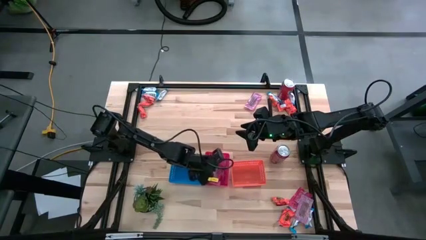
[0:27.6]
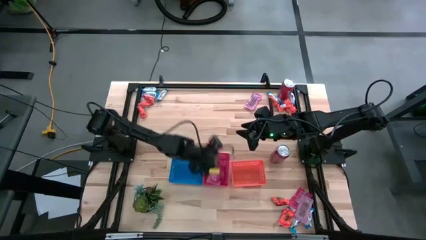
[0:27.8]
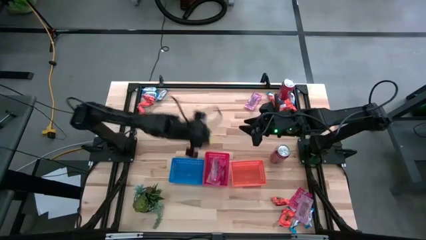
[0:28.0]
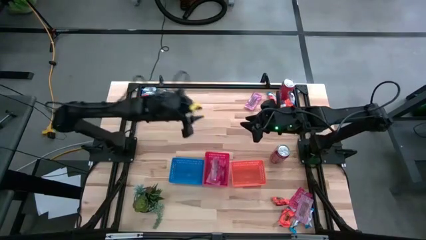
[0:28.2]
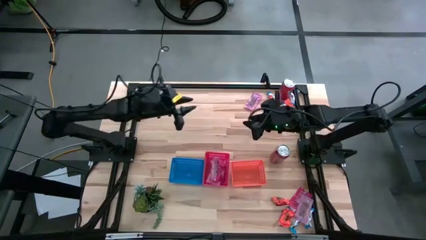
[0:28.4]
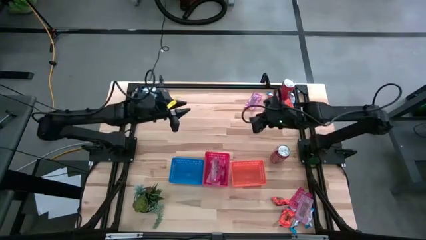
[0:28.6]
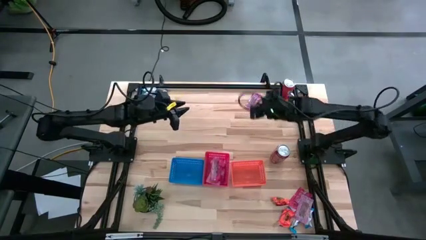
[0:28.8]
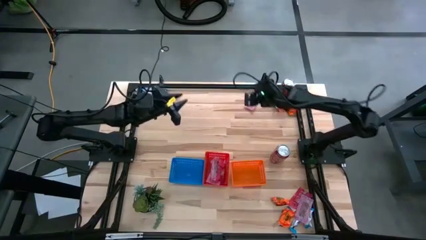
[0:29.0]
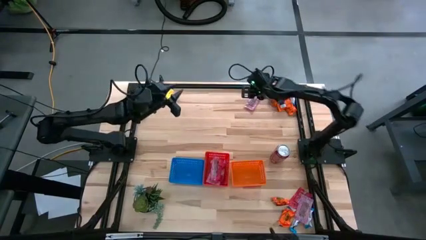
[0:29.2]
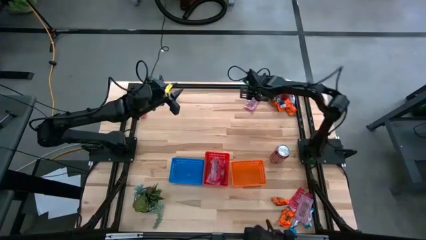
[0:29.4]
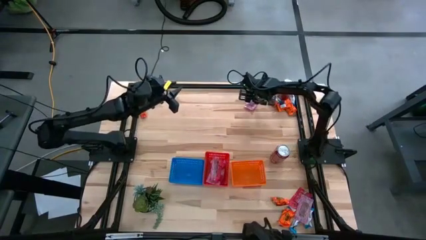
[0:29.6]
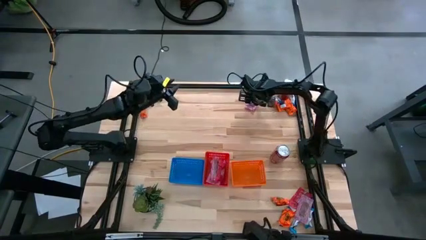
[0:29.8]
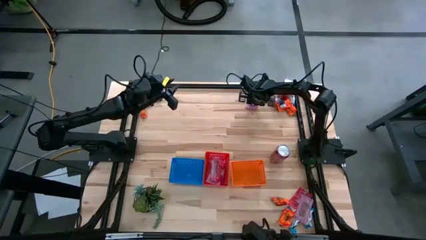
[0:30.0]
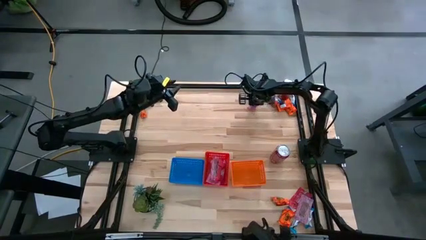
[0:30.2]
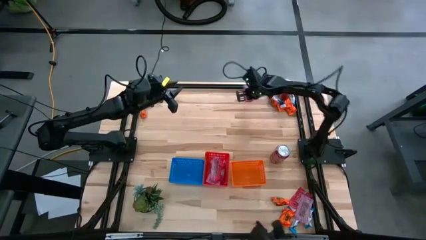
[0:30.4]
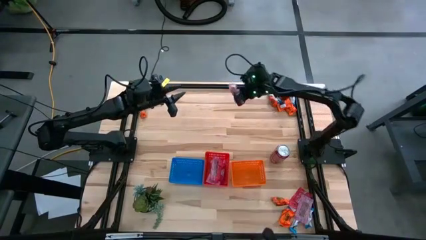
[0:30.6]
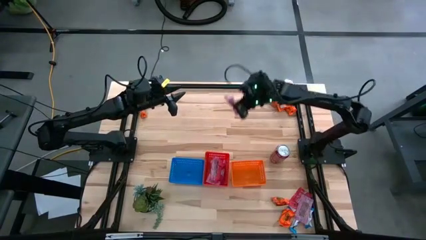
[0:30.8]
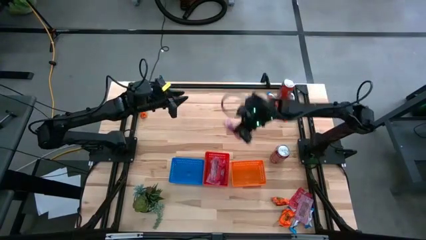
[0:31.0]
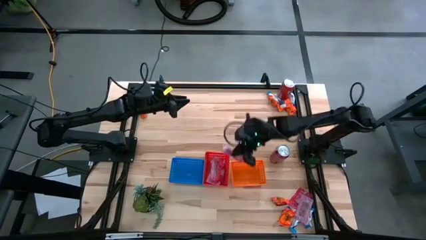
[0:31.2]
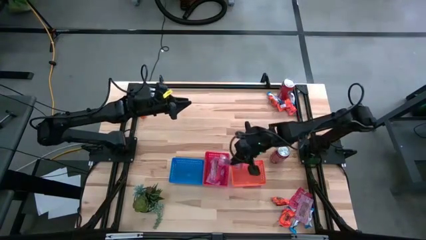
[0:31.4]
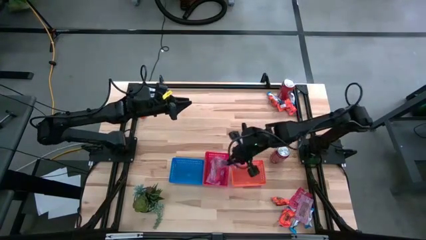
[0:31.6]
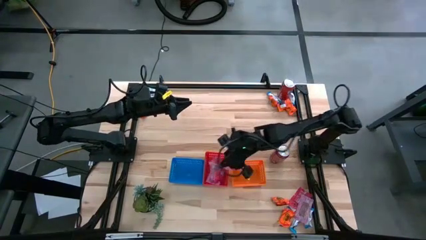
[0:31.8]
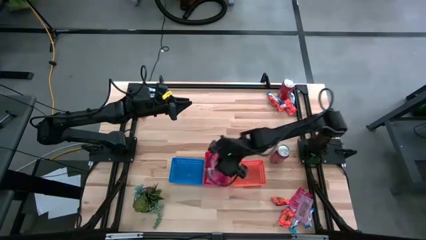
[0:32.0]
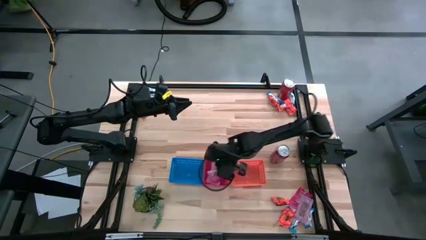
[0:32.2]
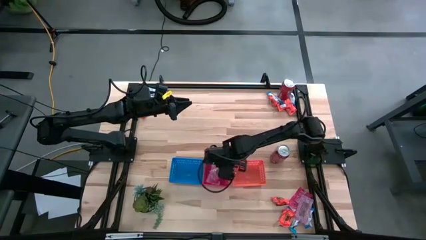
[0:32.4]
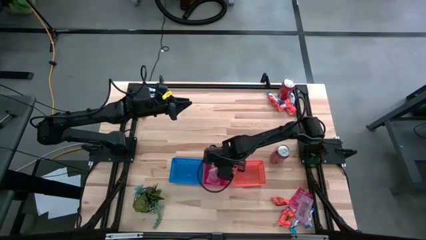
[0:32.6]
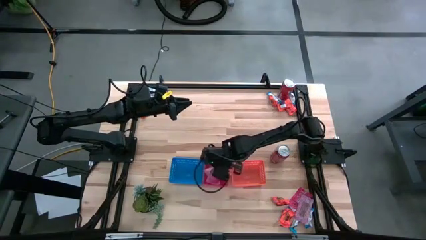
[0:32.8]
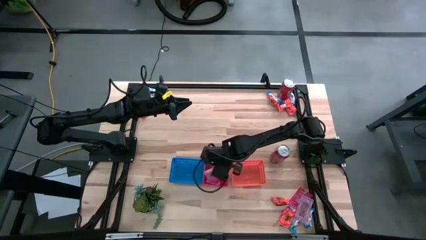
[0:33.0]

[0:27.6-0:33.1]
Task: Sort candy
Put the red candy pack into the red bin

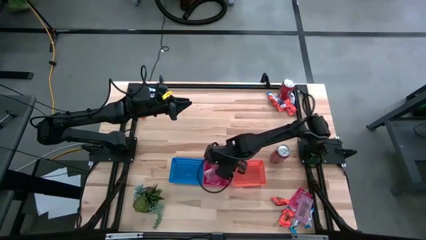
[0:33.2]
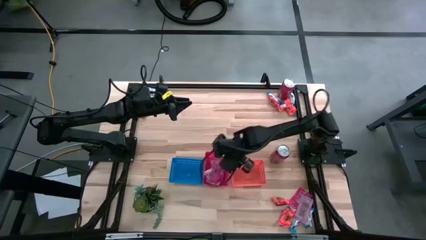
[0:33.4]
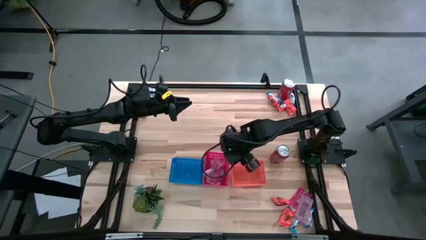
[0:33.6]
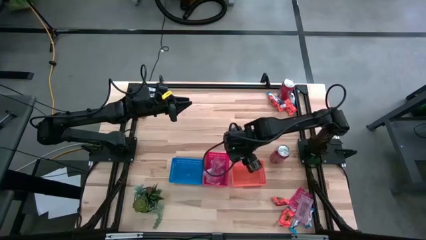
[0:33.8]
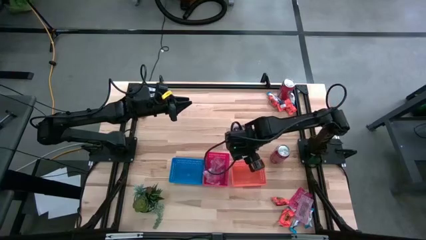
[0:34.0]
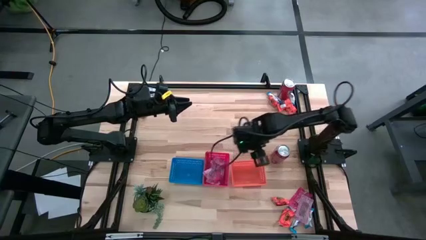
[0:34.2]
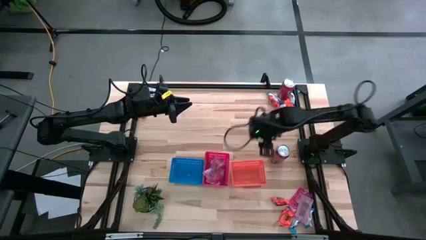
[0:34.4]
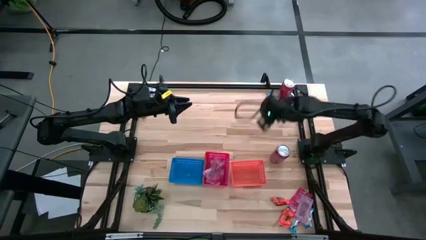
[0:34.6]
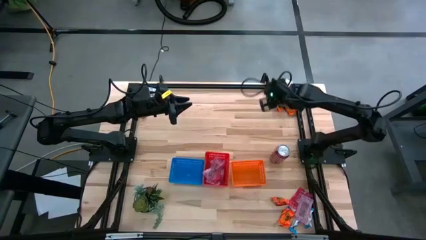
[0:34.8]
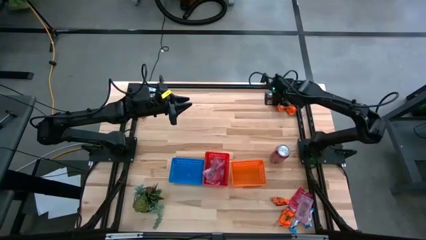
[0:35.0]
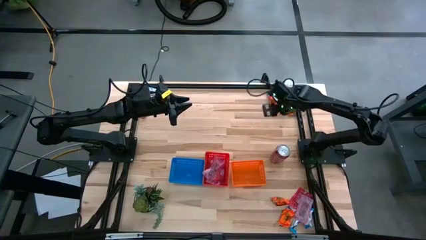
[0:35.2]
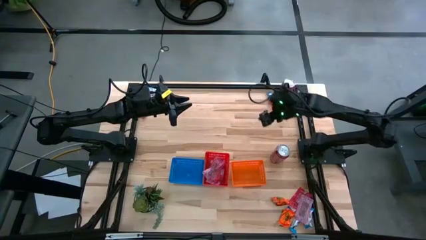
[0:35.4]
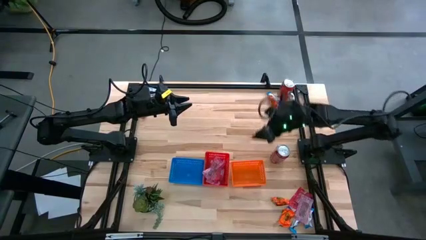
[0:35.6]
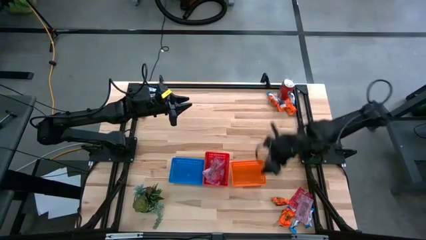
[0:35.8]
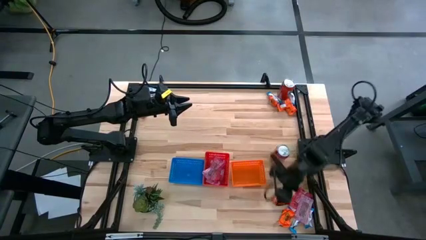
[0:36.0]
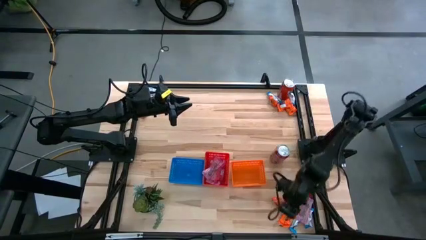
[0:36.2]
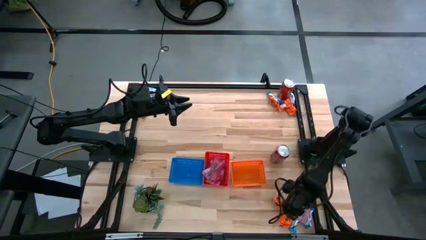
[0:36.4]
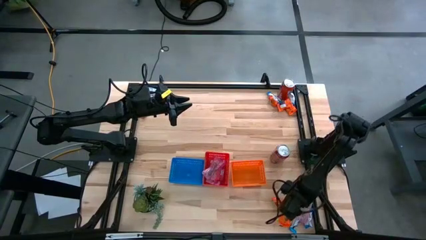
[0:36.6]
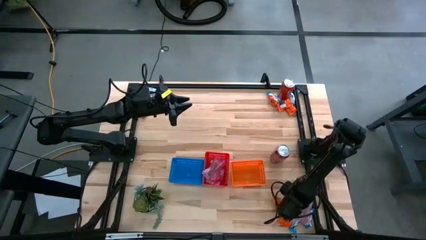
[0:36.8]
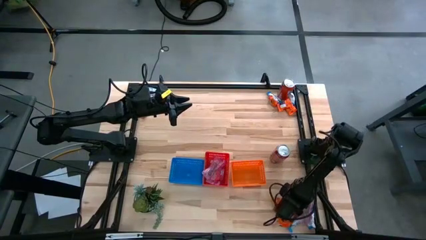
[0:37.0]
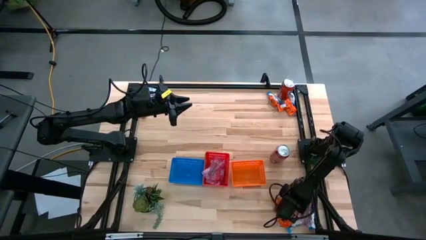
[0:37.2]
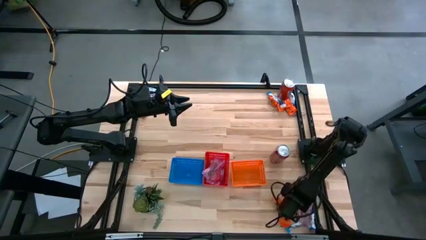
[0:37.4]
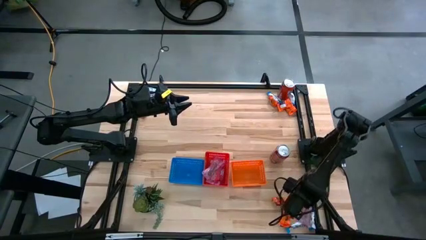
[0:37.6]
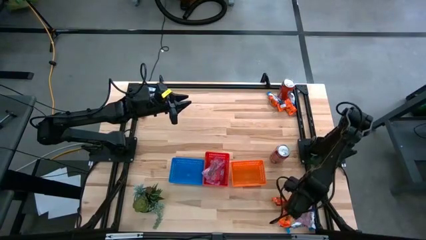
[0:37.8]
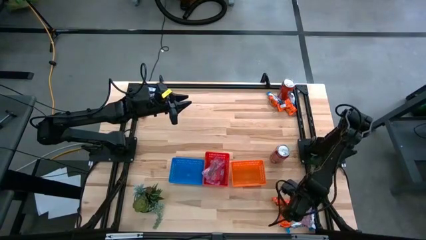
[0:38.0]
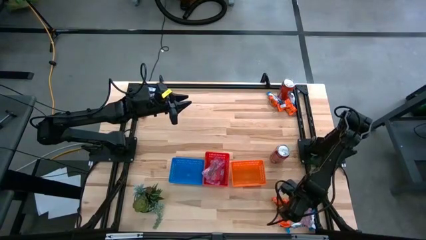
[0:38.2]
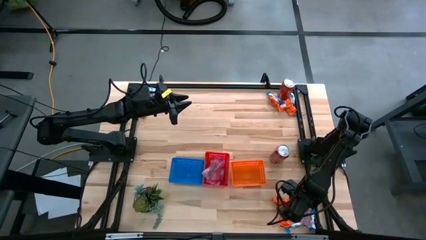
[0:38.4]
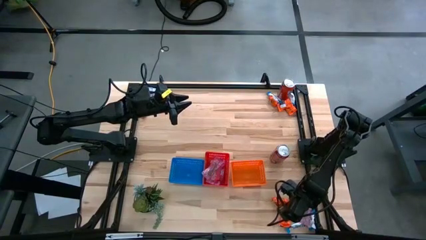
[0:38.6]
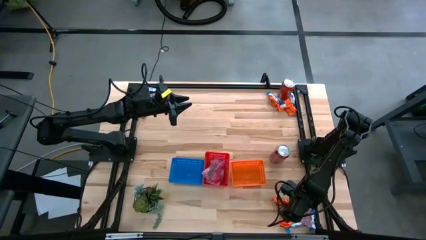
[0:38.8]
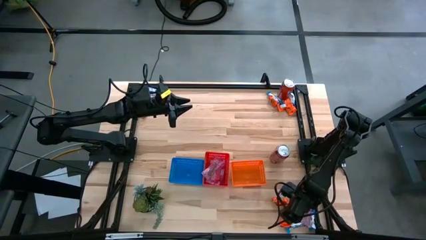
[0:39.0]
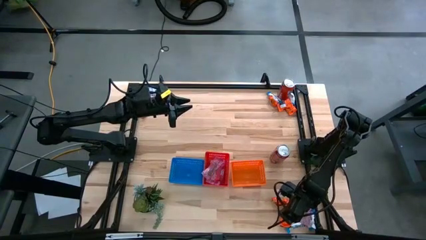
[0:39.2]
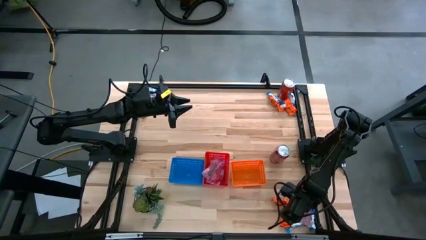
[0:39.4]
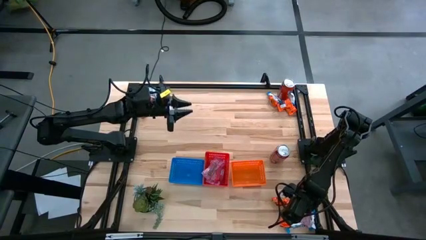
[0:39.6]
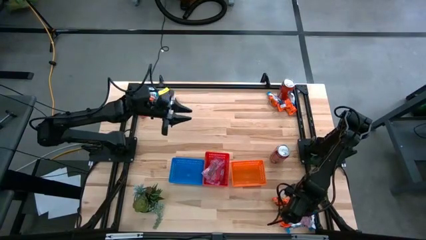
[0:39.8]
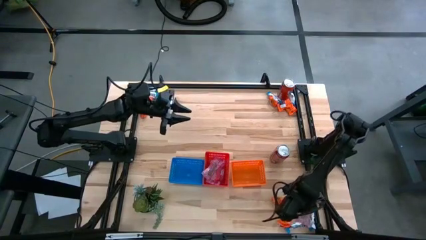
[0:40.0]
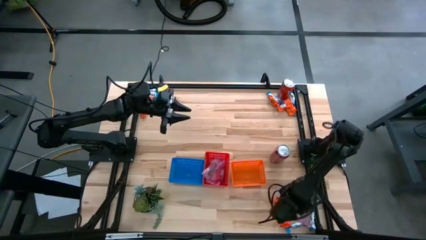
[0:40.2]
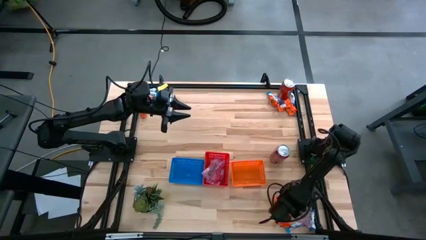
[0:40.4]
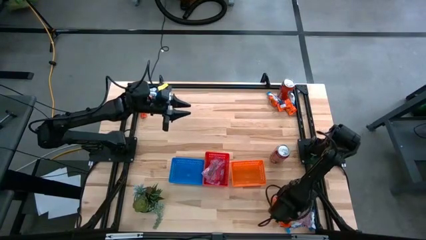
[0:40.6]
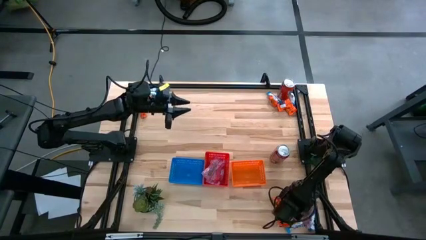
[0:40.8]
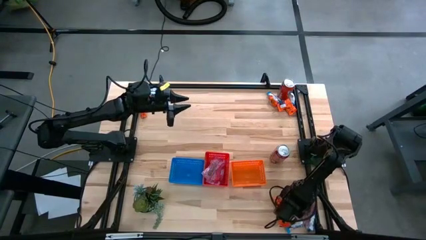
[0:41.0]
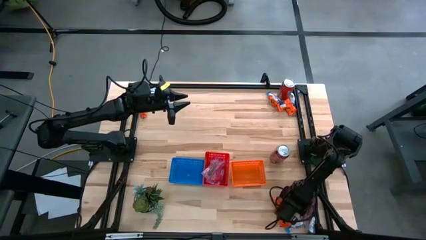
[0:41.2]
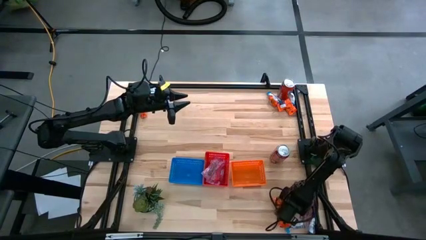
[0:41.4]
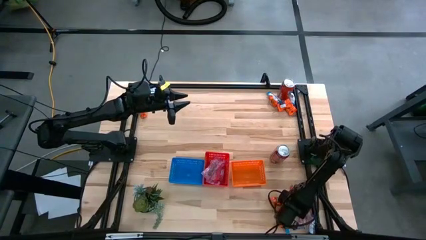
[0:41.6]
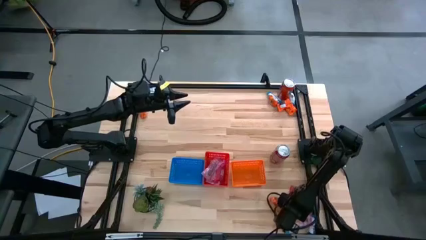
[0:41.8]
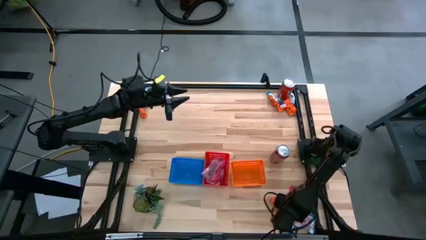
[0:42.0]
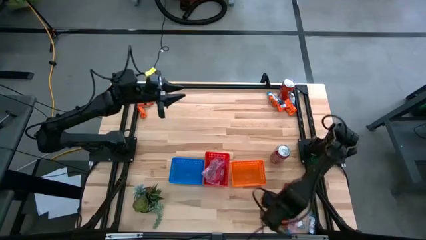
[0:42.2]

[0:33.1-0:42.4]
Put the red candy pack into the red bin

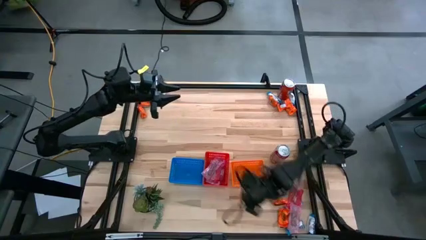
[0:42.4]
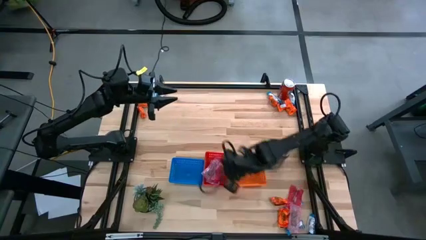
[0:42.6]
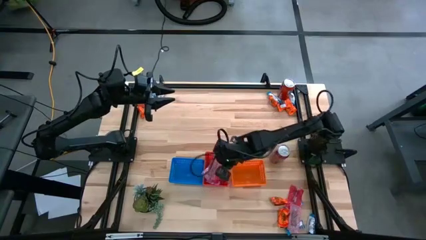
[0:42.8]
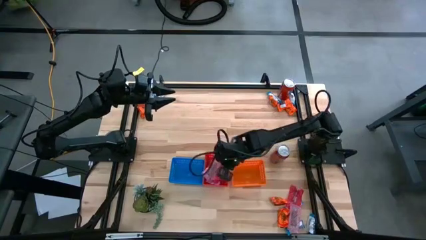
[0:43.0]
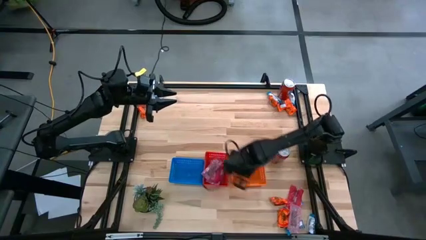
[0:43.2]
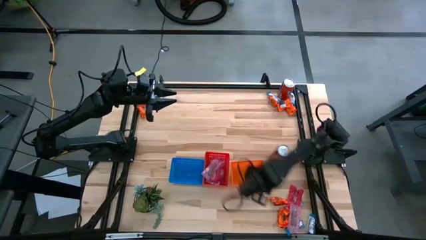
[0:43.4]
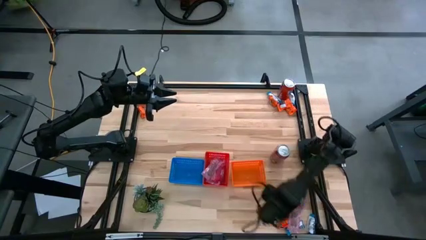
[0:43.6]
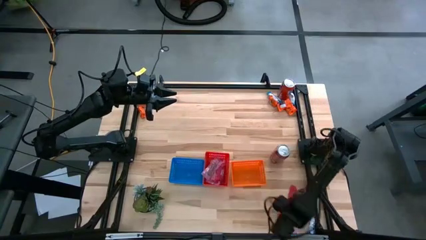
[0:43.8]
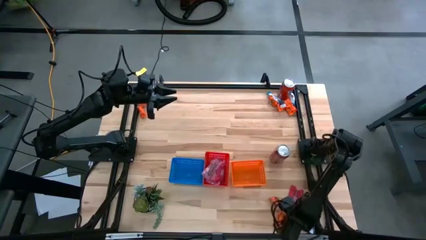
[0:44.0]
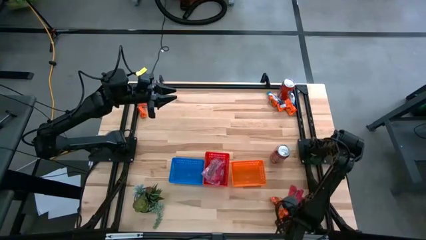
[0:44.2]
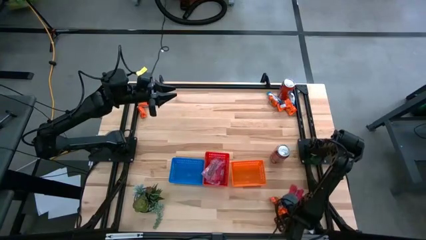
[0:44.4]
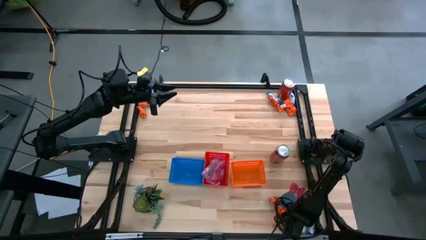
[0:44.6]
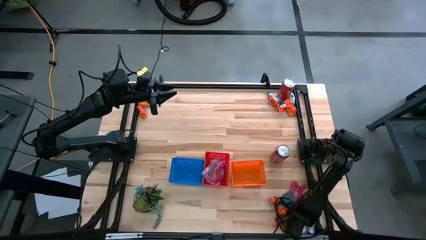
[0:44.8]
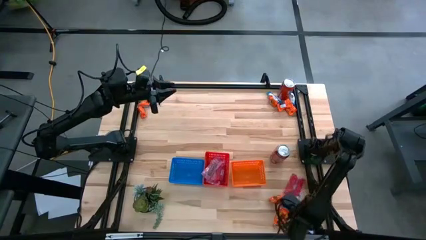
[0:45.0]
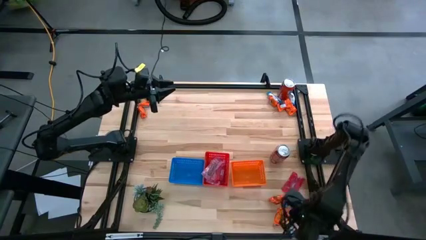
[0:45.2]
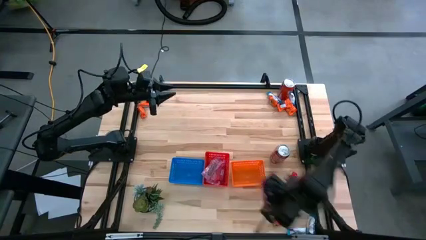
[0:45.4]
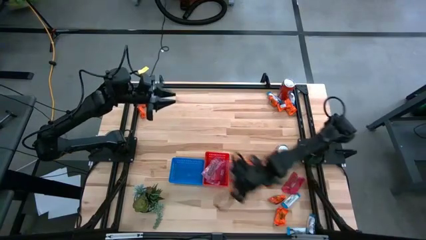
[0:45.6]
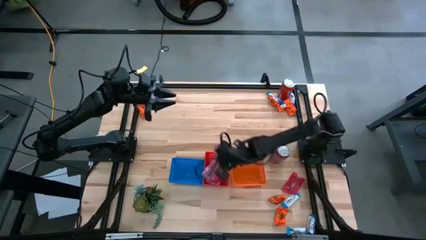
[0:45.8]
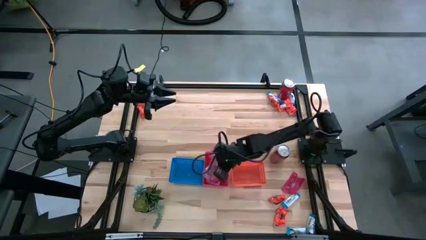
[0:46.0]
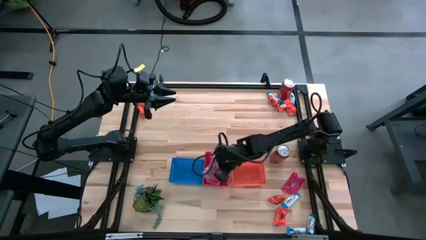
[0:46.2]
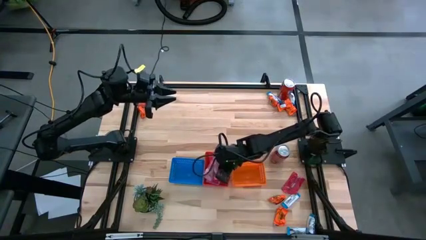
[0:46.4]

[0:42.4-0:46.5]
Put the red candy pack into the red bin
